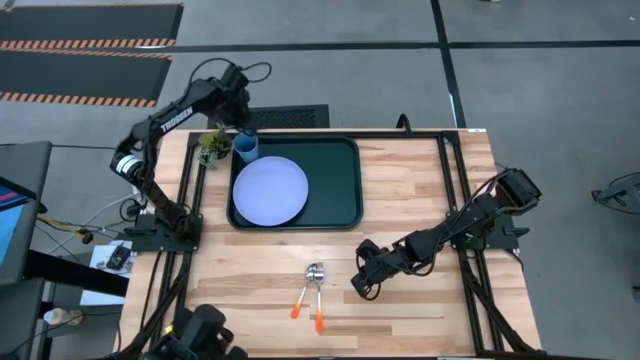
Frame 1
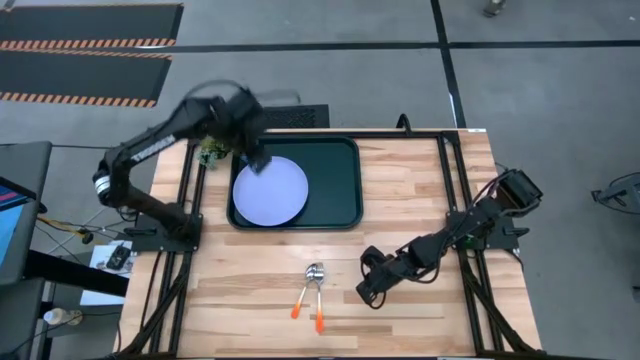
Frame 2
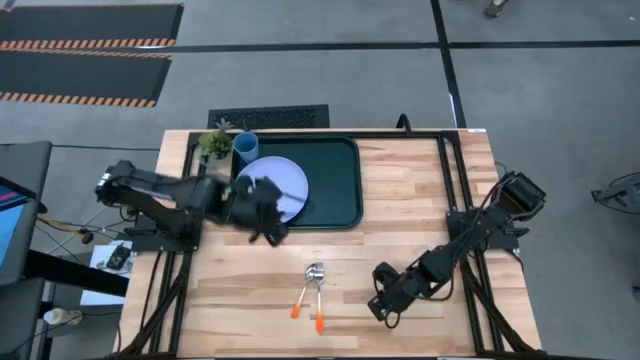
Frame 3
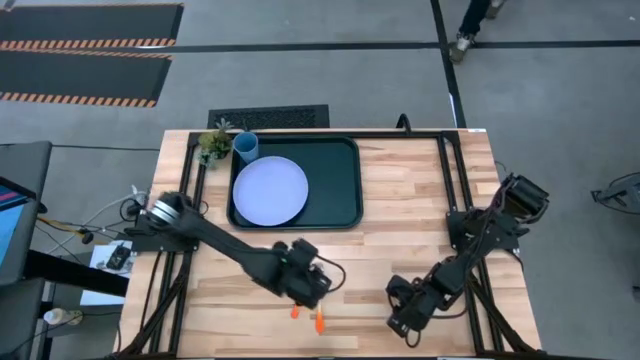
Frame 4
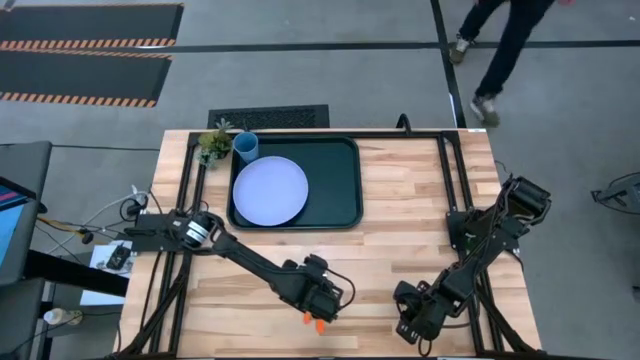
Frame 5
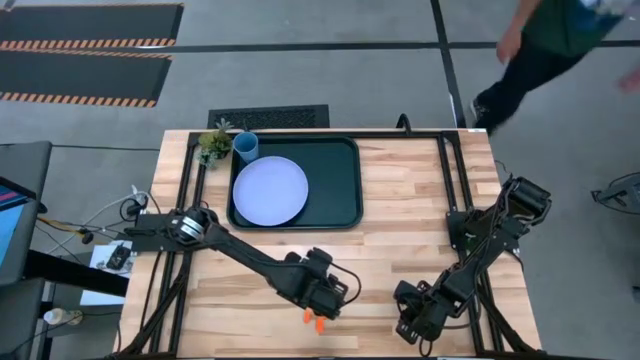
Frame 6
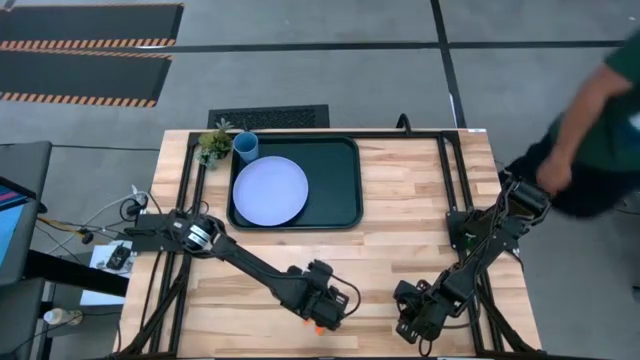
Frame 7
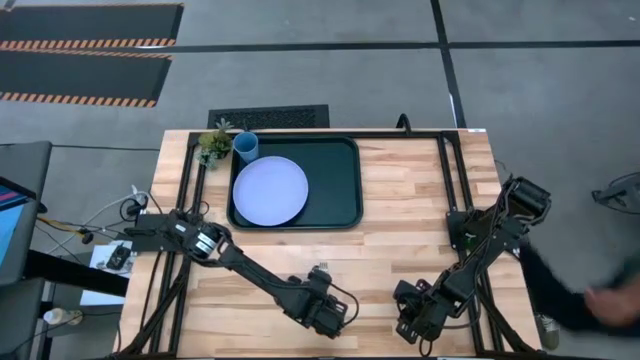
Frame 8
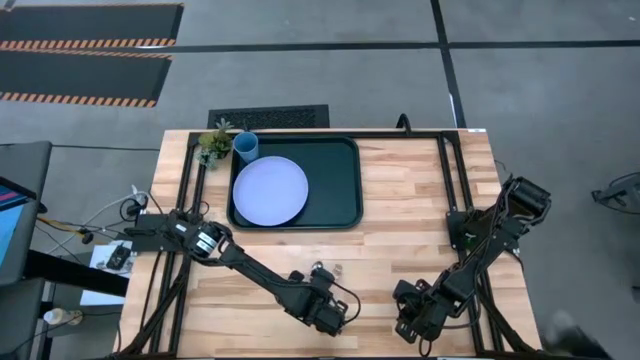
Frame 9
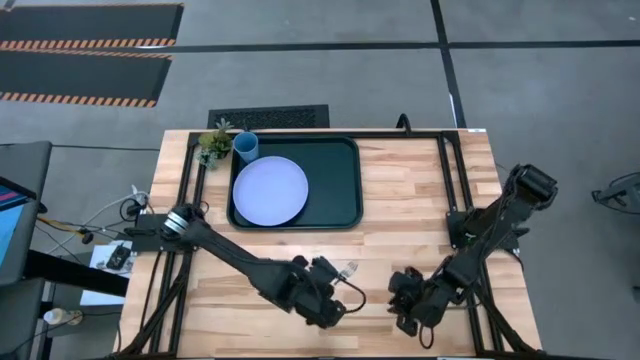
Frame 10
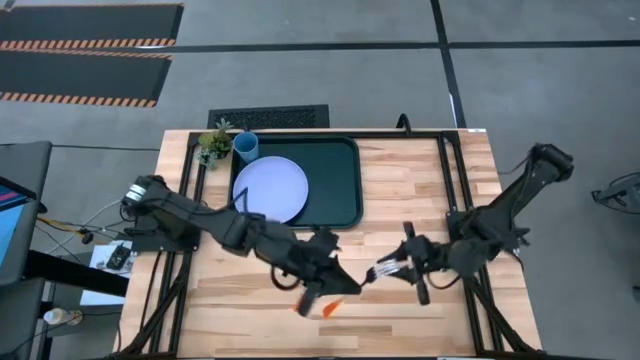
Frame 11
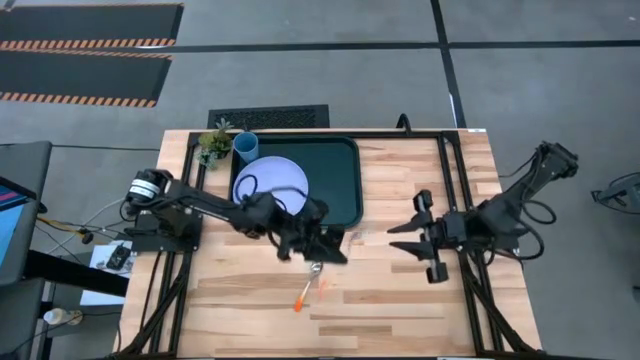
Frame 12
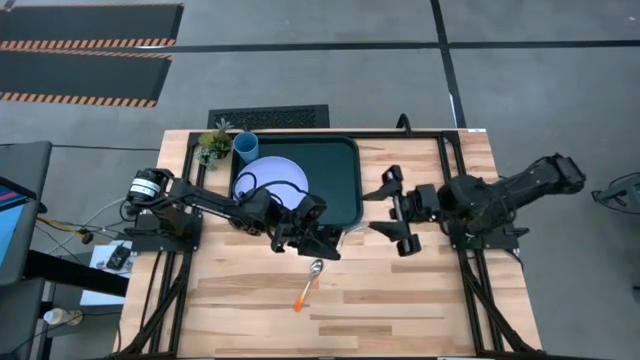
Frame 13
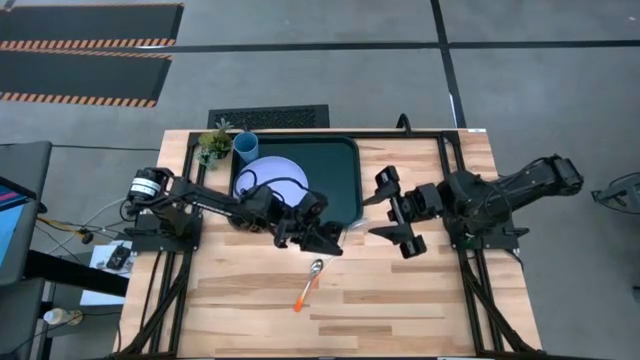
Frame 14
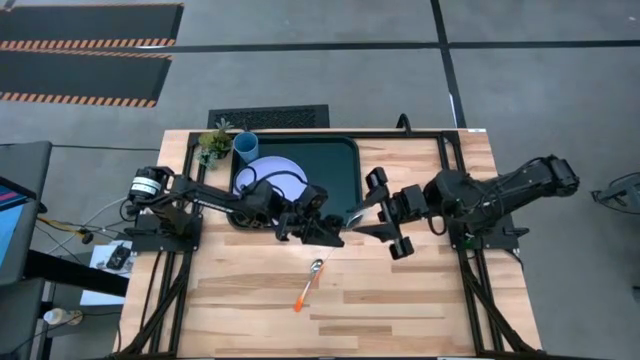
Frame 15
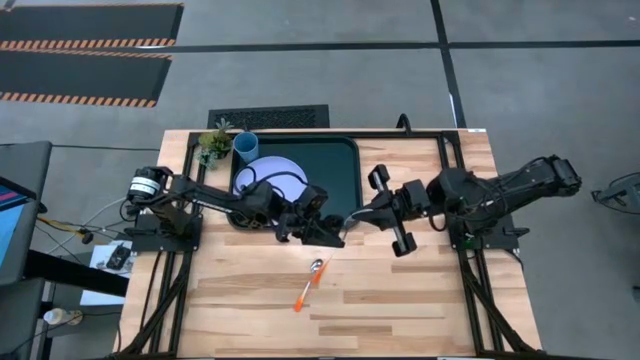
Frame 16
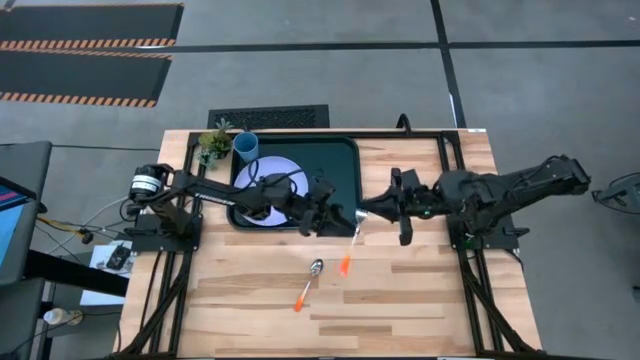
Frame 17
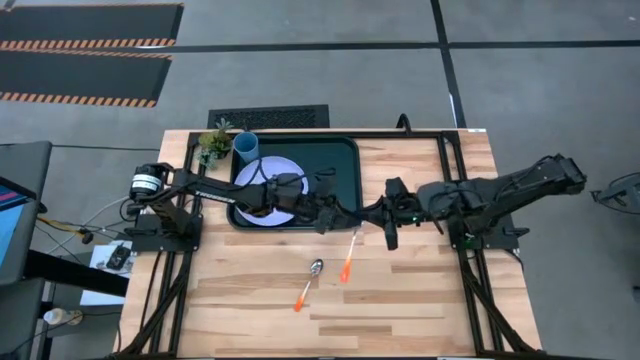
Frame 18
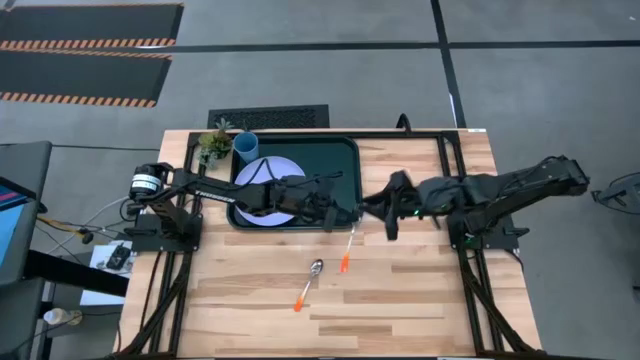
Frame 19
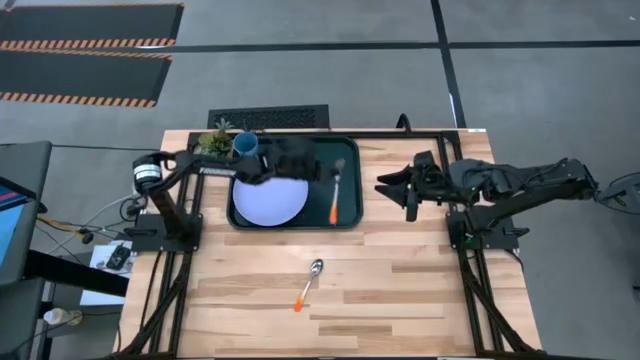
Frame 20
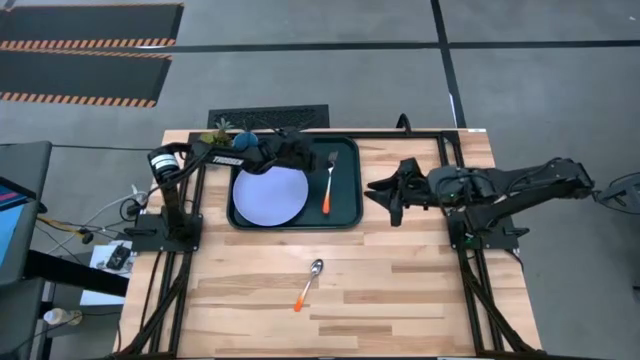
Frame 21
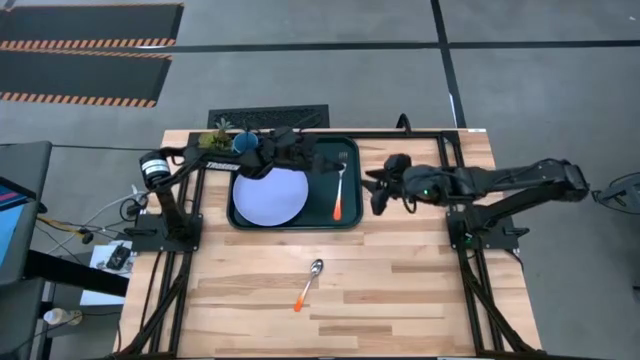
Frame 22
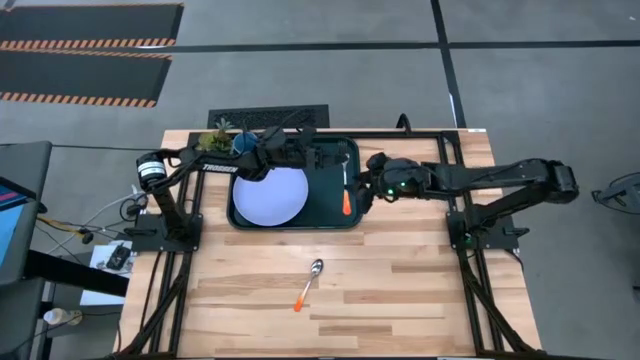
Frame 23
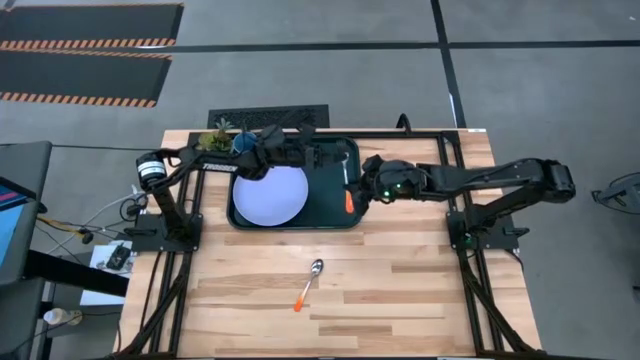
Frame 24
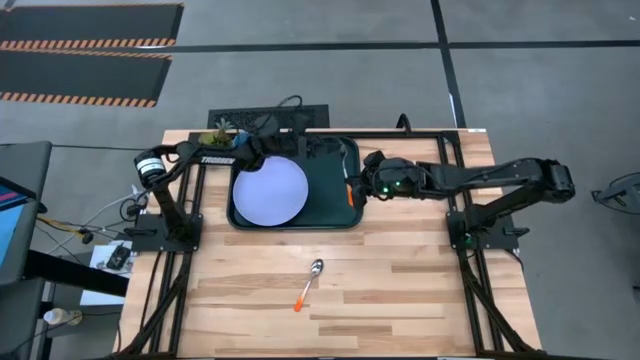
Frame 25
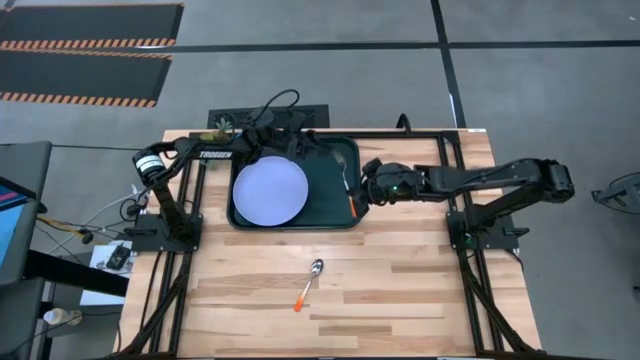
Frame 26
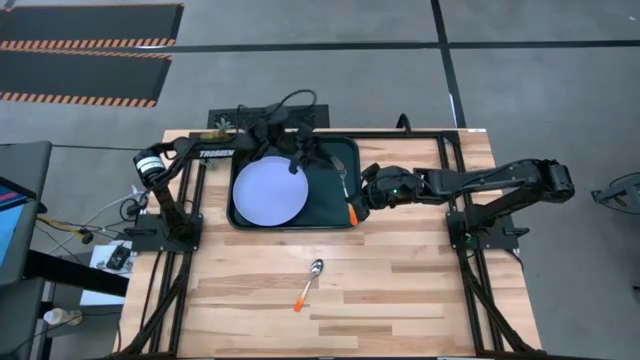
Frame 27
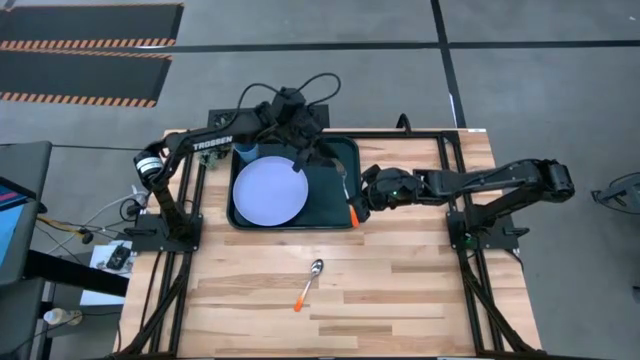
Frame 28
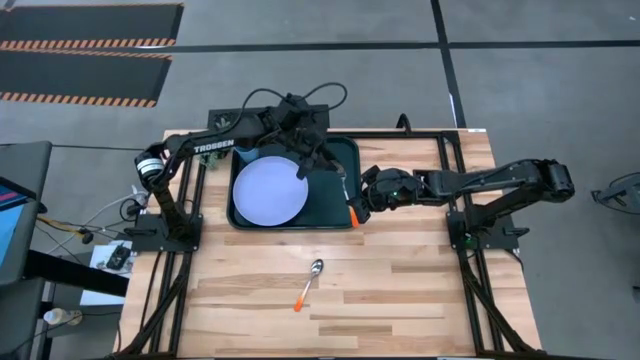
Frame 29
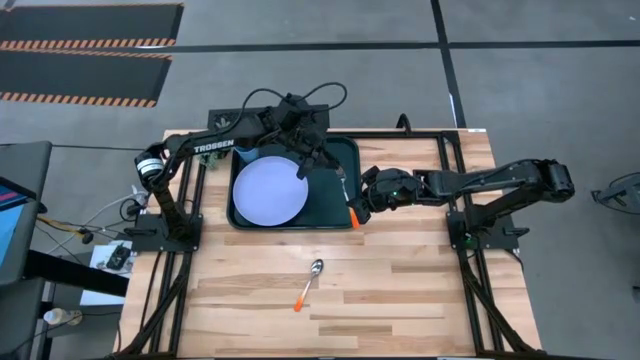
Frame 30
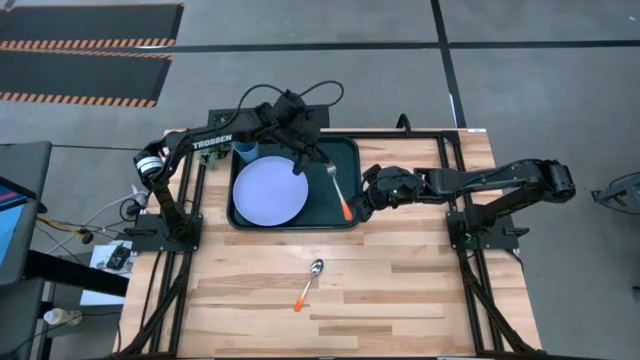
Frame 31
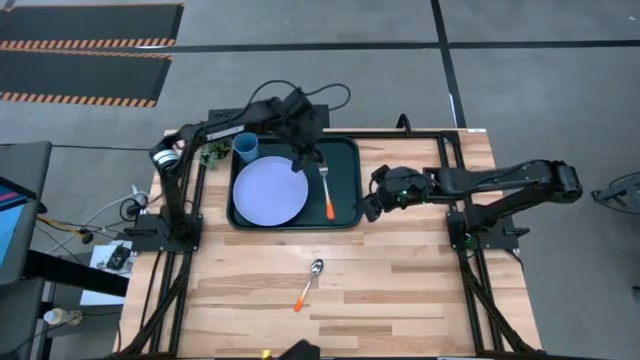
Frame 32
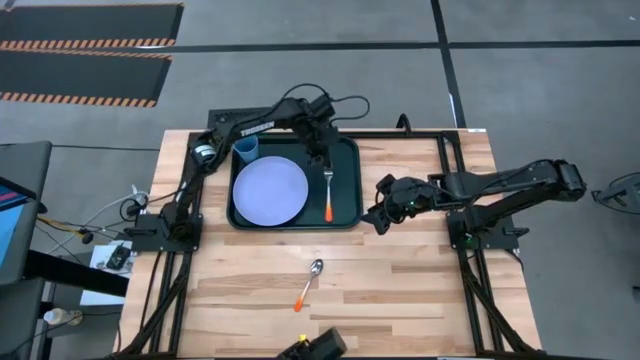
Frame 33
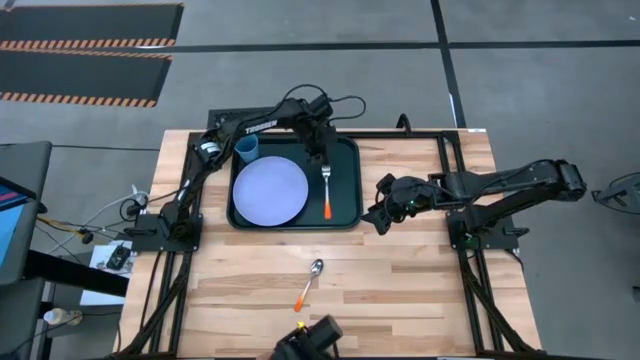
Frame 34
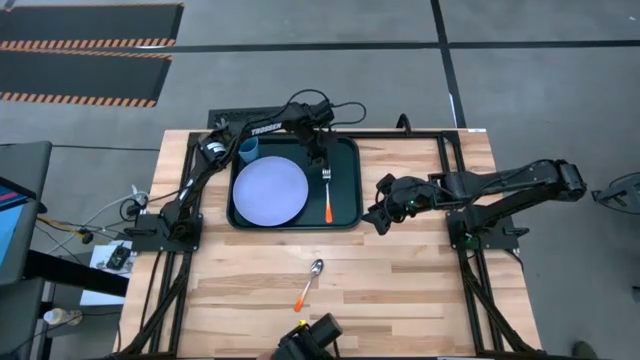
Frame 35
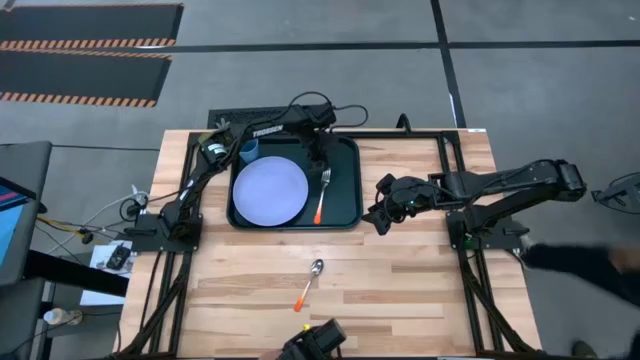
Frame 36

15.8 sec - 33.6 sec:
Task: Pick and place plate/cup/fork/spoon on tray
Put the orange fork to the right of the light blue plate on the dark green tray
